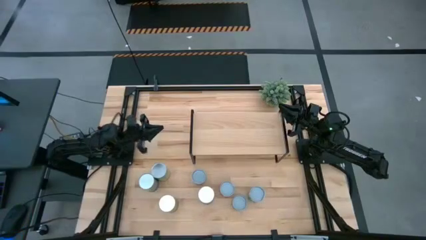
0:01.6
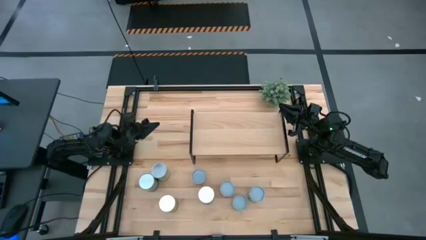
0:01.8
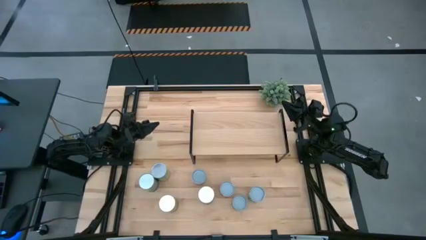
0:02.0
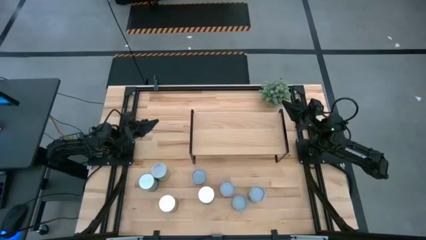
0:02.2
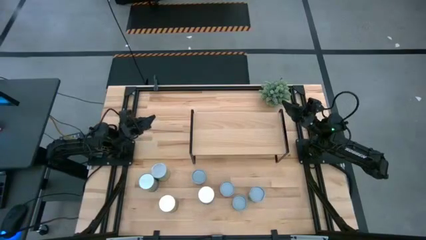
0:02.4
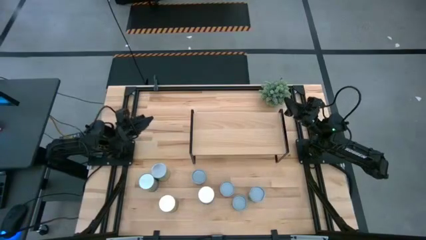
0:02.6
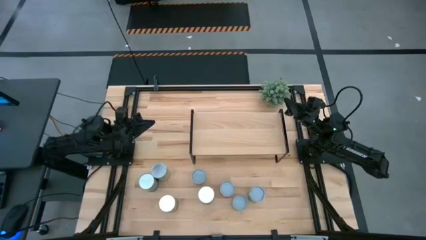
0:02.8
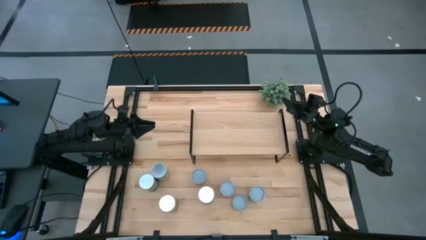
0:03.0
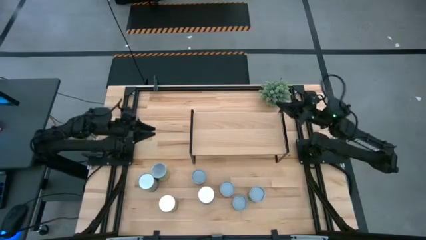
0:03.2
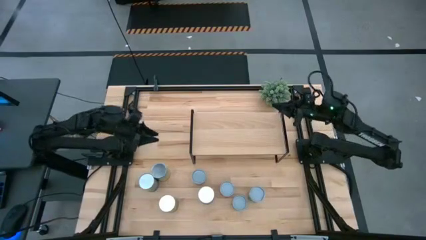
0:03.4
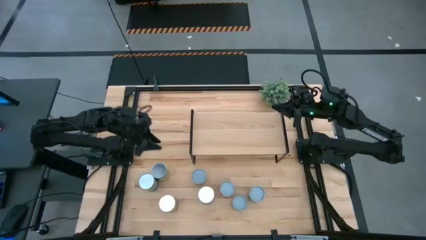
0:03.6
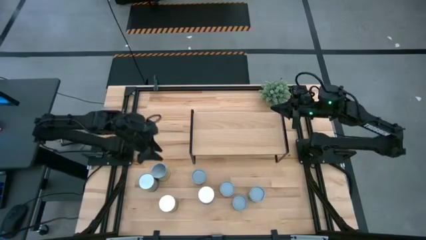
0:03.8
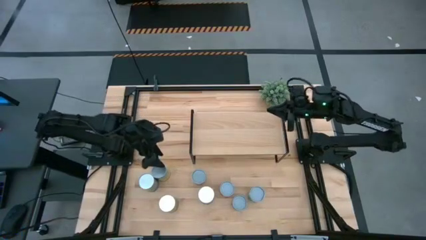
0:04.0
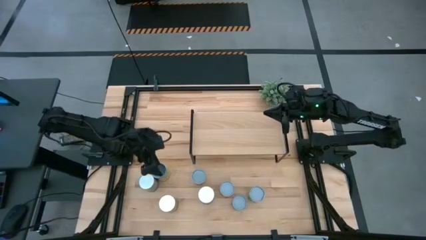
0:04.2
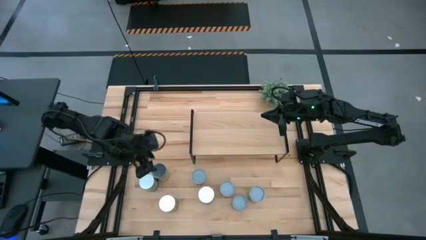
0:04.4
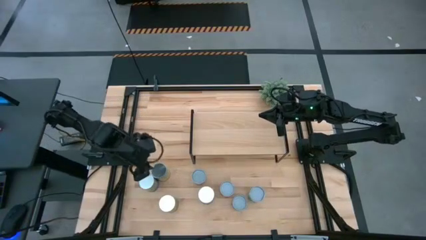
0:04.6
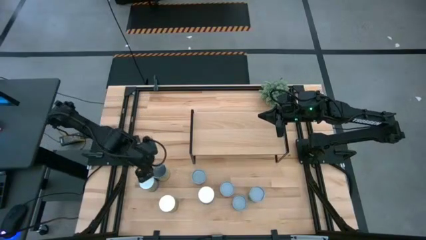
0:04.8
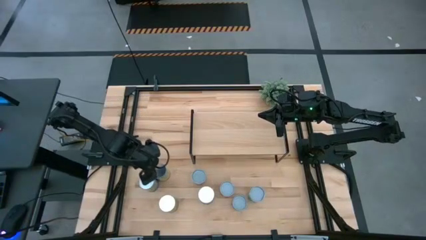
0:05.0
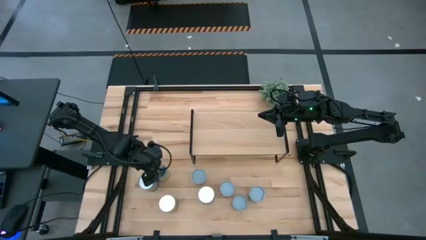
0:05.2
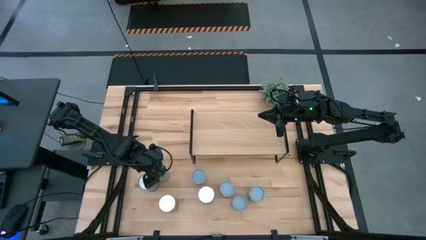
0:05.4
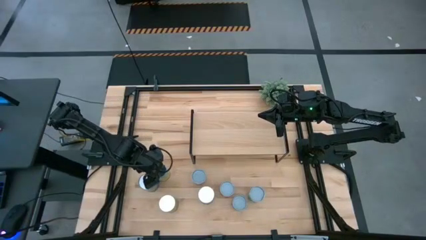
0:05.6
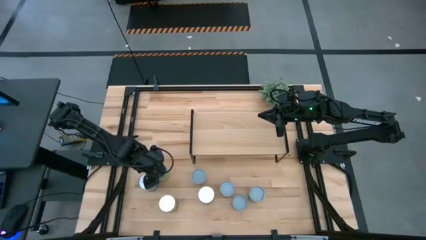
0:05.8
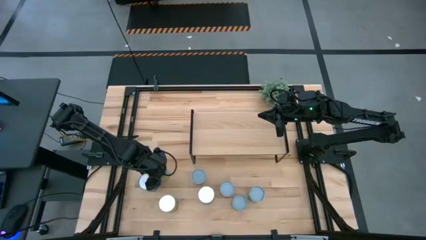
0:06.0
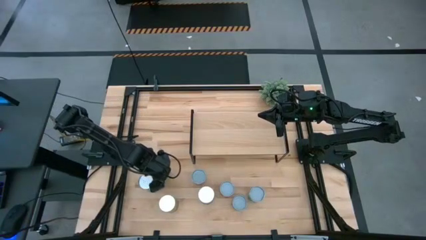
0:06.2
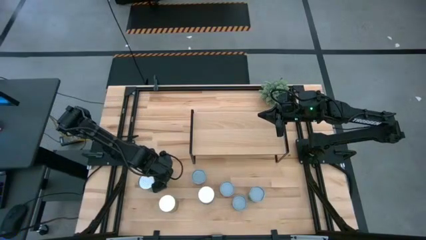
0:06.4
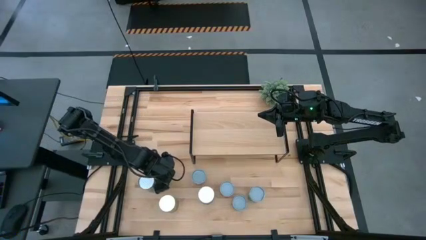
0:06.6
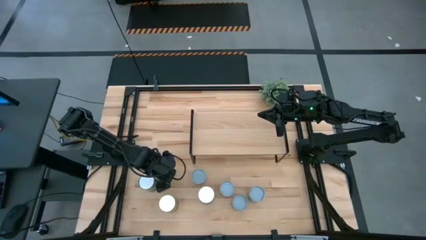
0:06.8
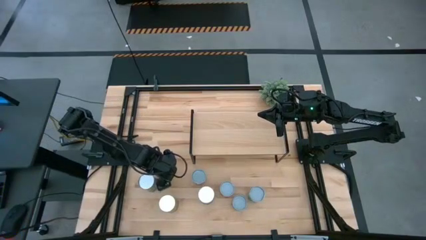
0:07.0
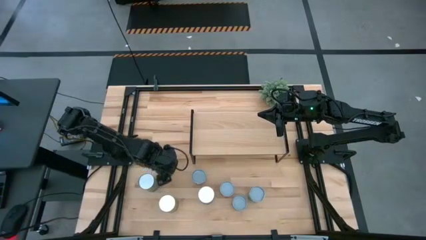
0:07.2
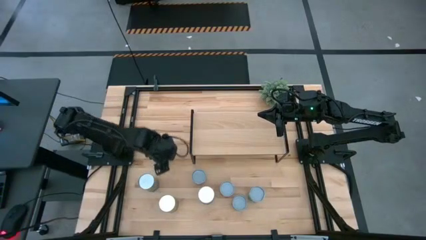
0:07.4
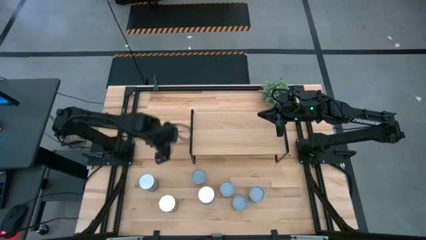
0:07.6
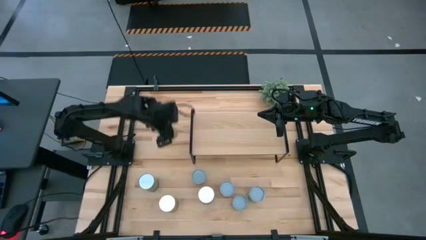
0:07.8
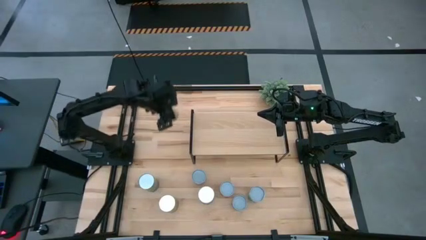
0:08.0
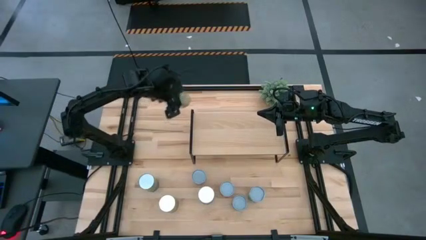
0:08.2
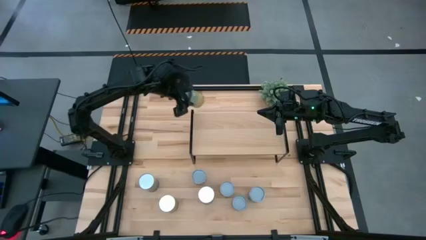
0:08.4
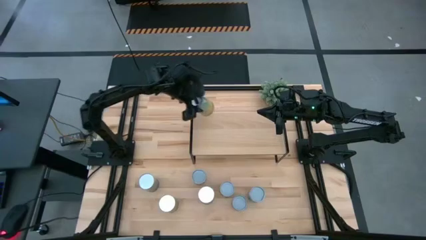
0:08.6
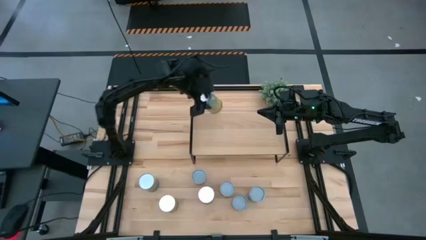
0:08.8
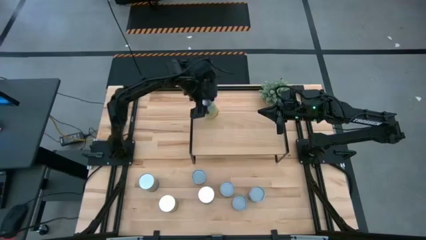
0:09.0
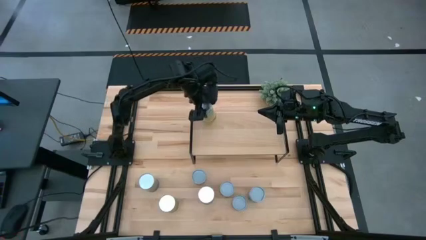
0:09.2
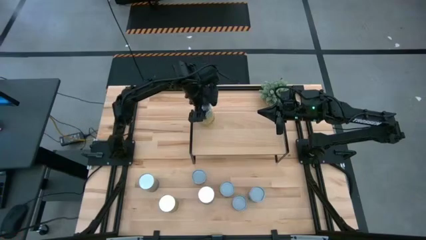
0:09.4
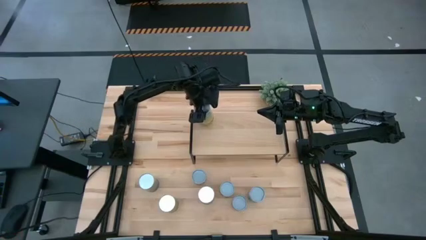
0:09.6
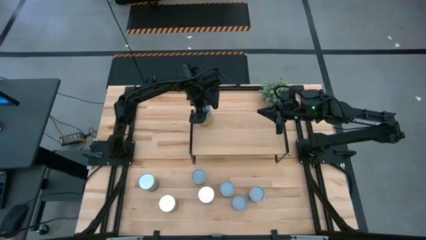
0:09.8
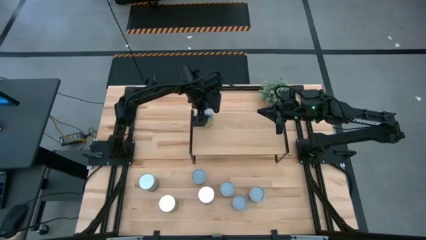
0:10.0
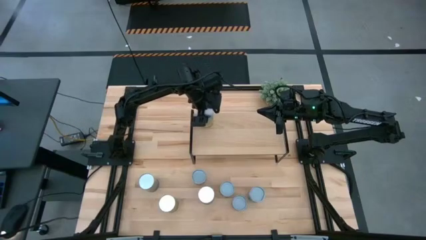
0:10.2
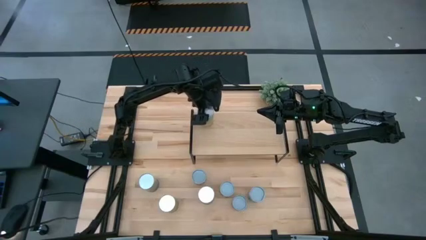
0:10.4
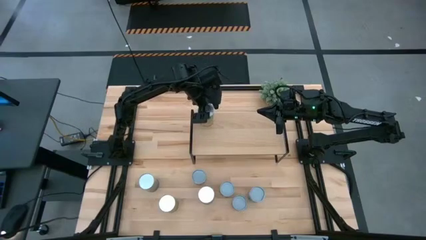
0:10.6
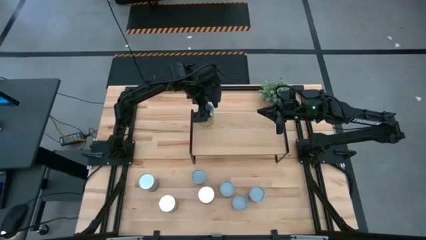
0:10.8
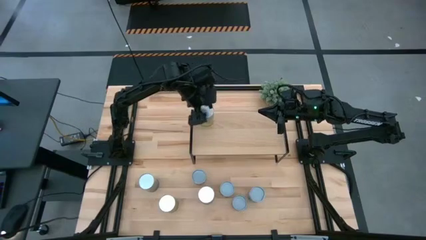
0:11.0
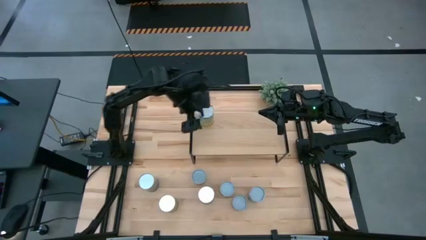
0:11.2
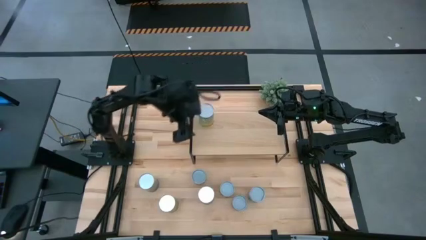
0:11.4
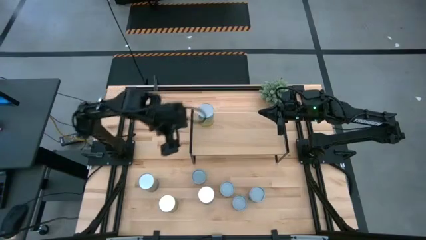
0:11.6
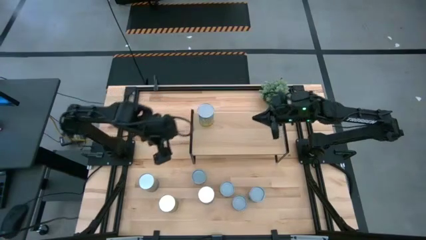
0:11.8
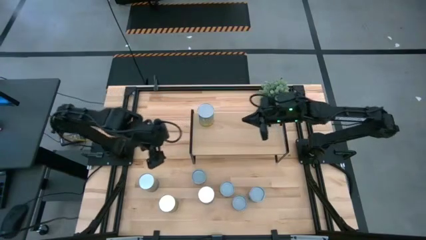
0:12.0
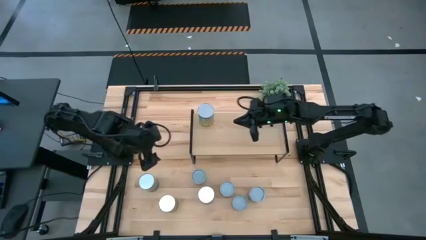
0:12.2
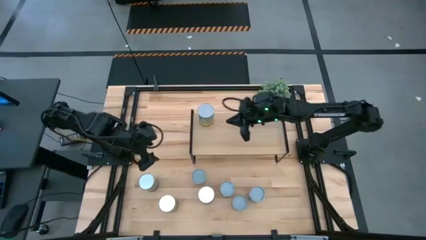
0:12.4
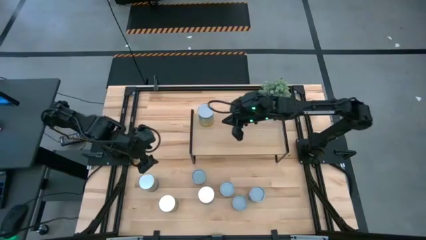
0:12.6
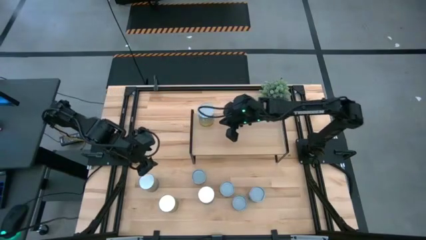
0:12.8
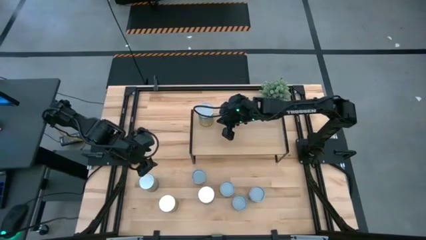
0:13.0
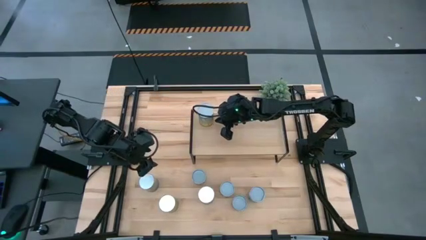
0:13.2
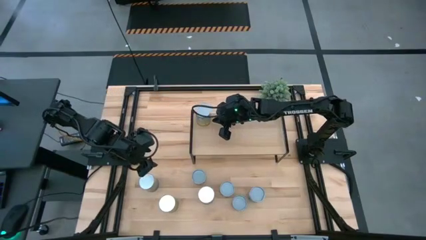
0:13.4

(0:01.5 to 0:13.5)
Task: Pick and place cans onto a shelf
Put the canned carrots on the shelf

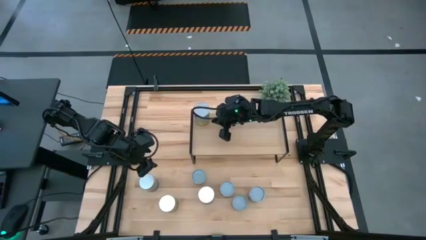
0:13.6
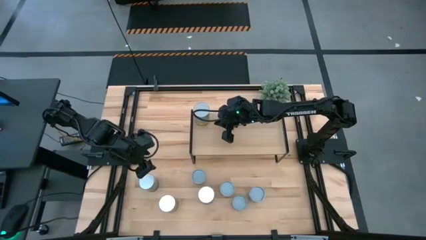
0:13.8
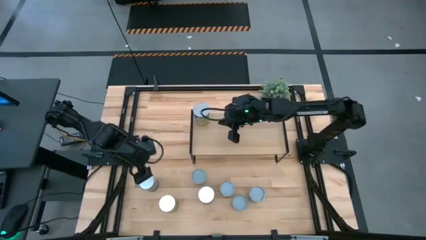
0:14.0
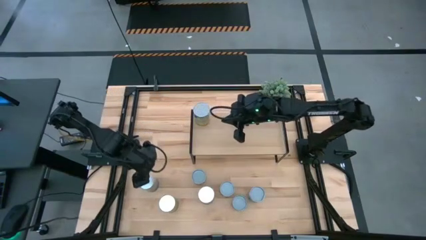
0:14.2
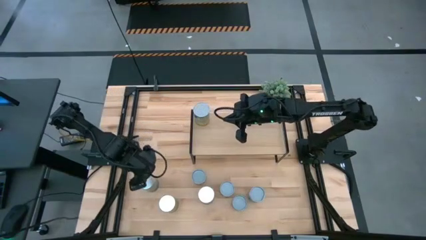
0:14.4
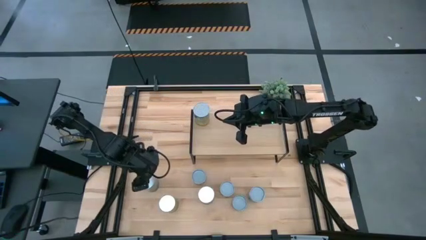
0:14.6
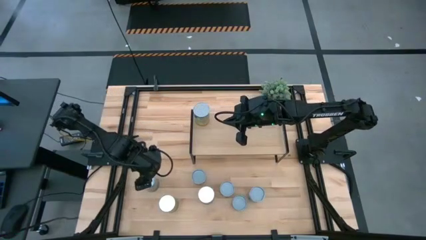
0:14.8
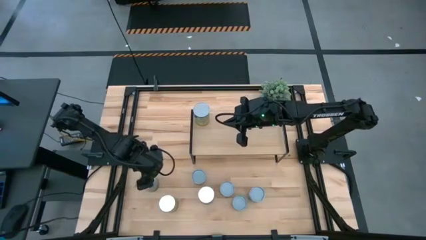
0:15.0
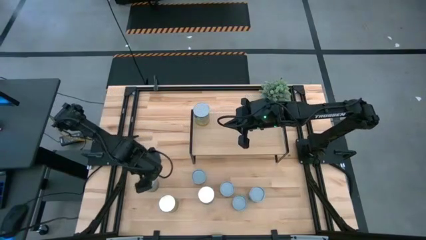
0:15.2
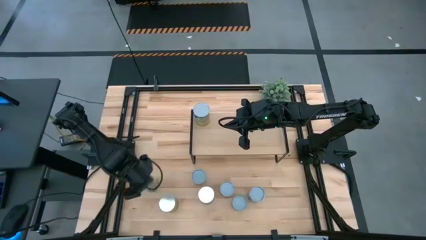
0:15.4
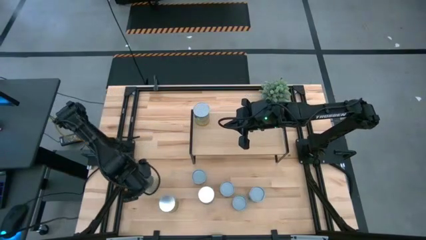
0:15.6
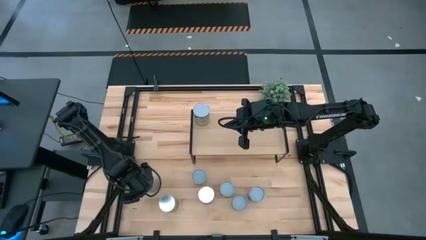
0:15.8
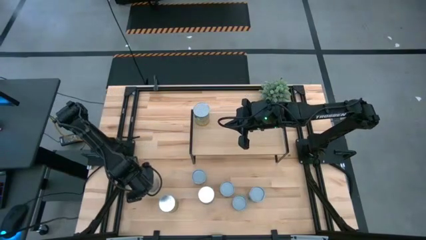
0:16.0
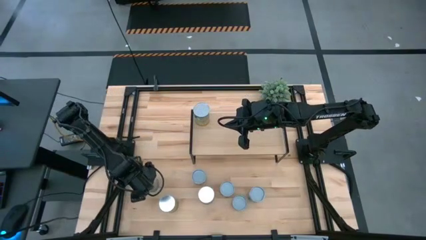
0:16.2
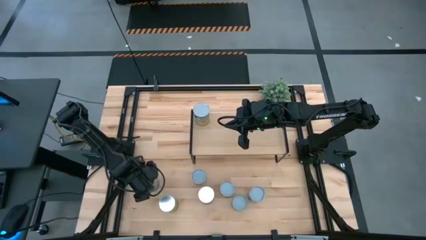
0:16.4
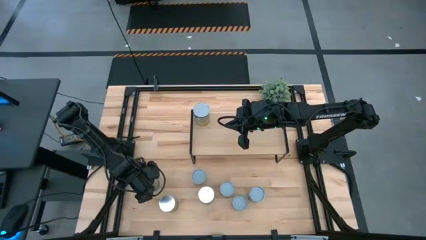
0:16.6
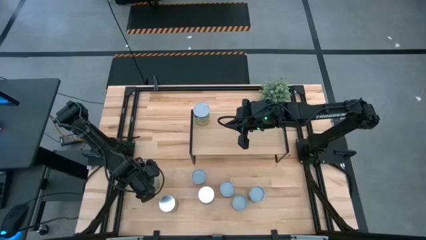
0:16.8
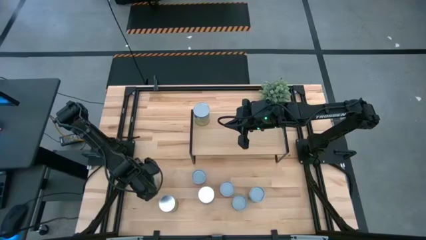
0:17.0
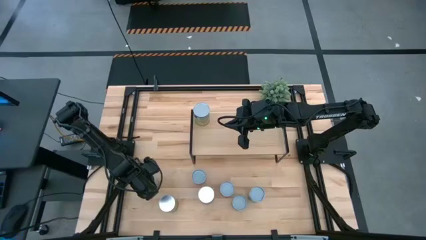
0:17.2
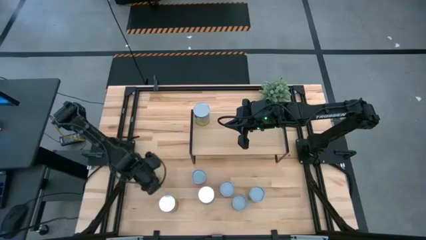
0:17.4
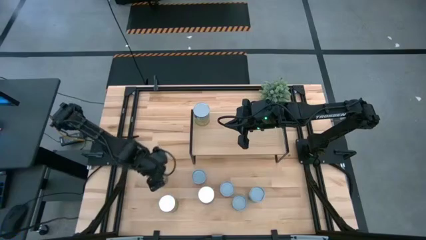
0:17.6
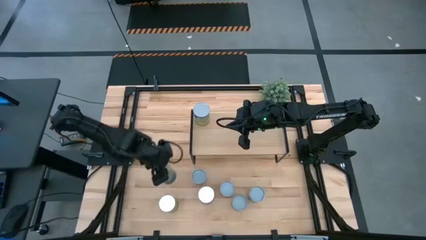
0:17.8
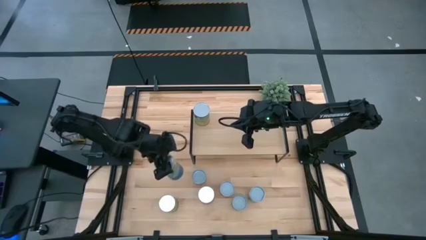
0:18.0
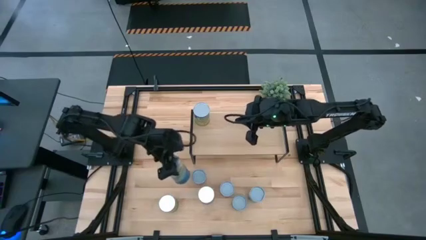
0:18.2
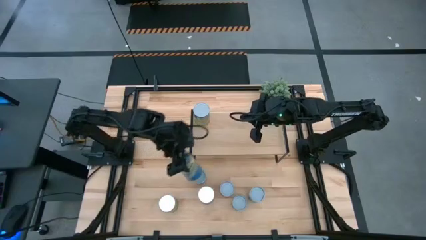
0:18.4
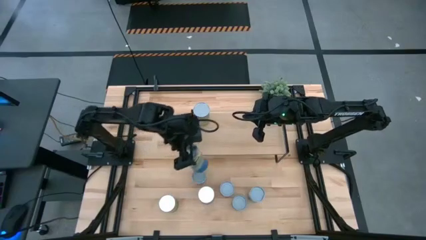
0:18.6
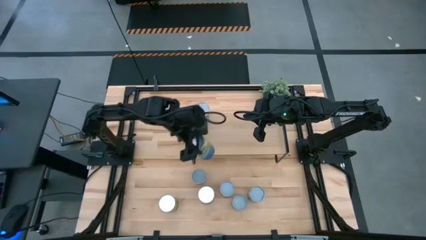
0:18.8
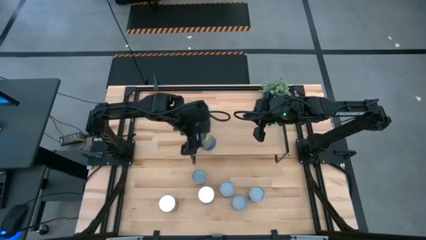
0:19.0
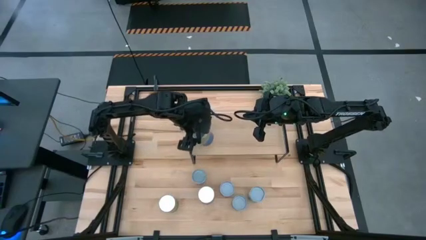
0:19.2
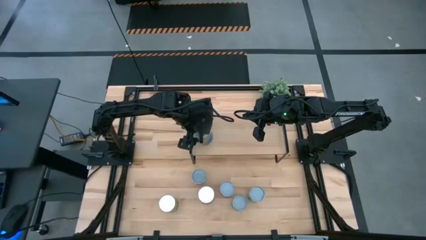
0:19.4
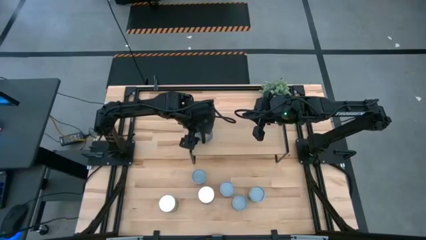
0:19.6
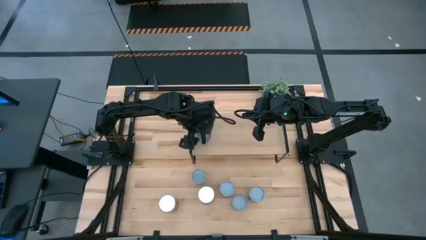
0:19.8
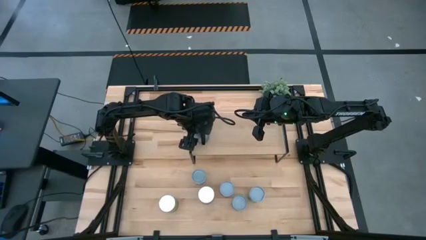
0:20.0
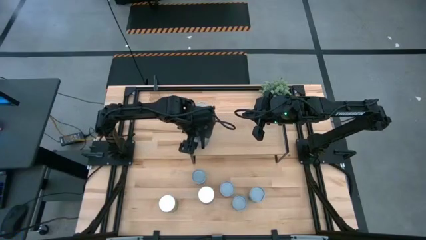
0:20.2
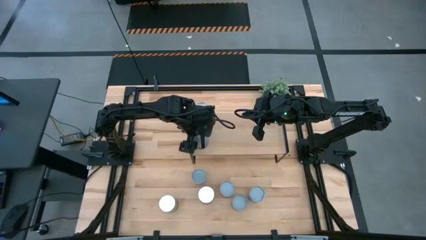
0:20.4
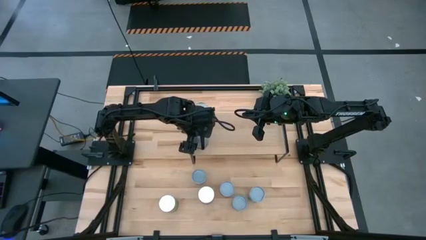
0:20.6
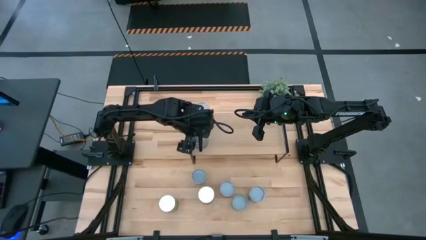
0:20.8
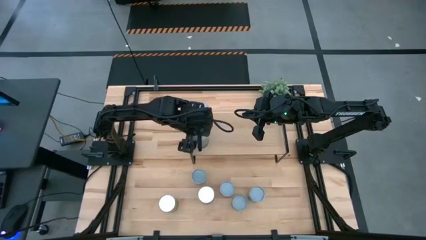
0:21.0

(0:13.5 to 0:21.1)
Put the canned peas on the shelf
